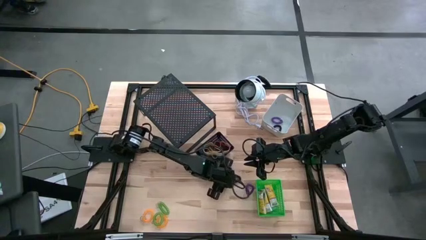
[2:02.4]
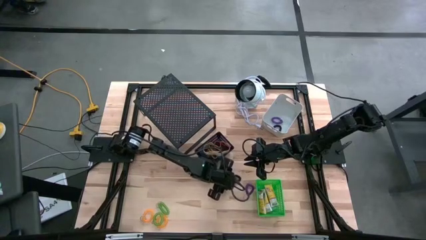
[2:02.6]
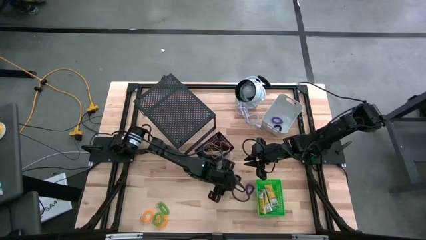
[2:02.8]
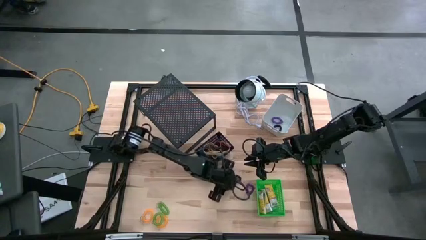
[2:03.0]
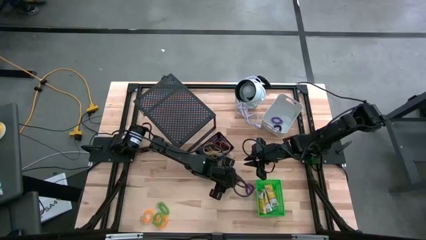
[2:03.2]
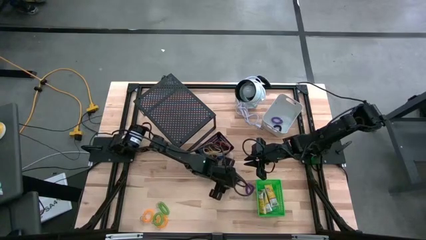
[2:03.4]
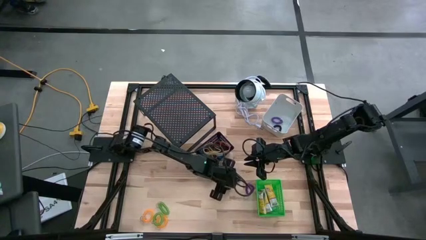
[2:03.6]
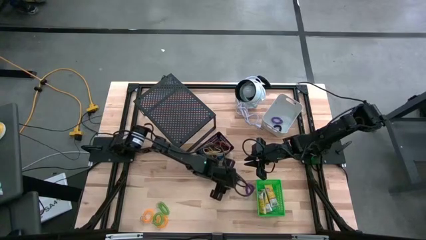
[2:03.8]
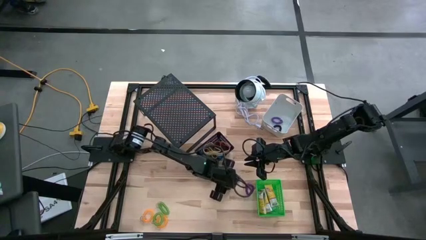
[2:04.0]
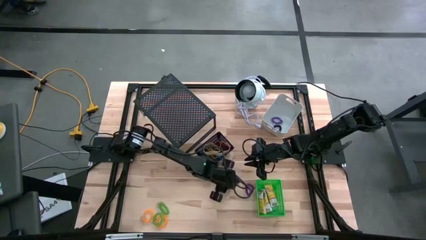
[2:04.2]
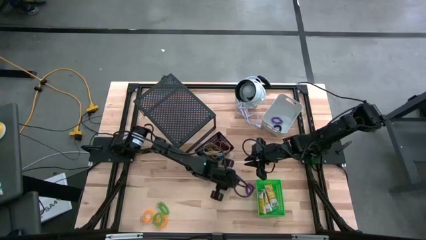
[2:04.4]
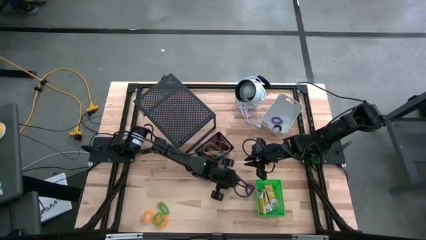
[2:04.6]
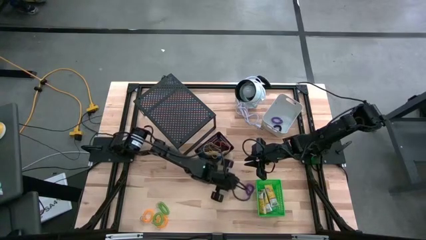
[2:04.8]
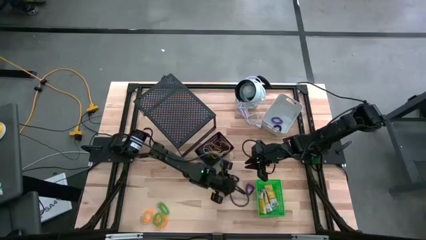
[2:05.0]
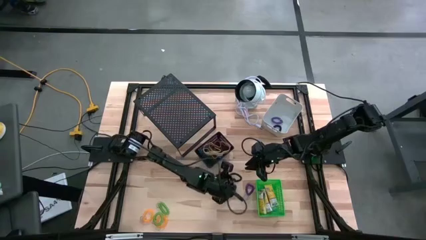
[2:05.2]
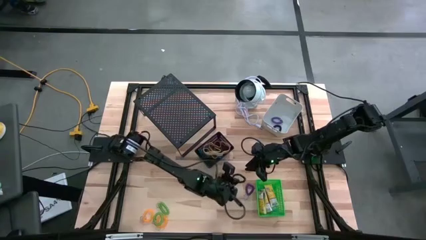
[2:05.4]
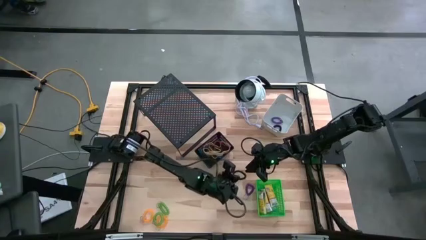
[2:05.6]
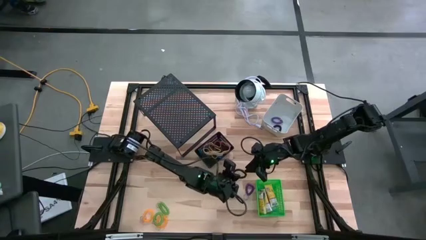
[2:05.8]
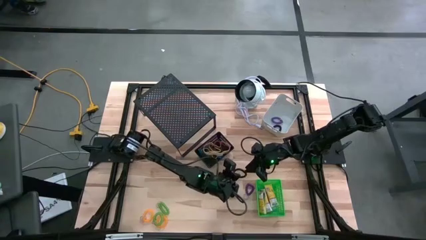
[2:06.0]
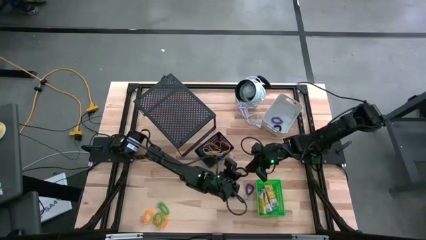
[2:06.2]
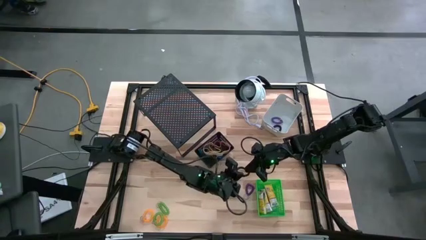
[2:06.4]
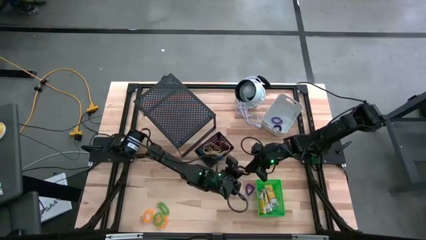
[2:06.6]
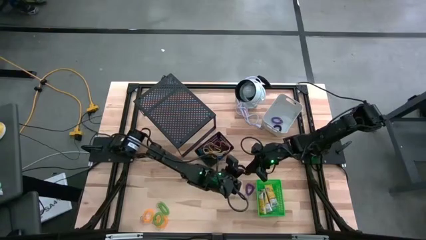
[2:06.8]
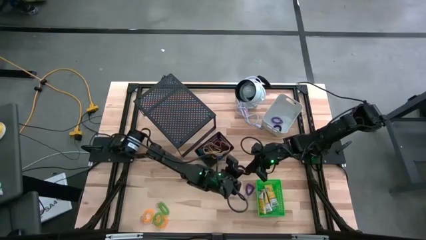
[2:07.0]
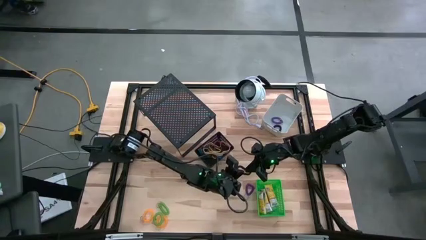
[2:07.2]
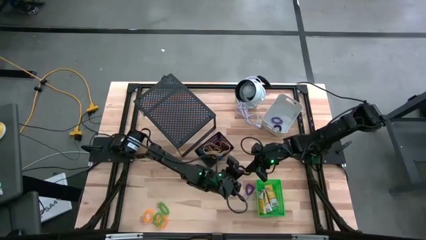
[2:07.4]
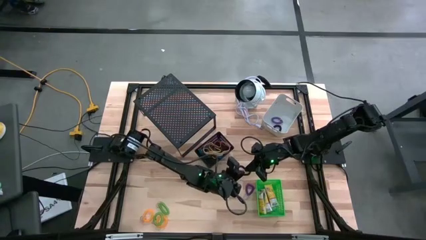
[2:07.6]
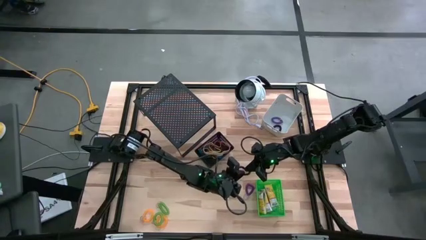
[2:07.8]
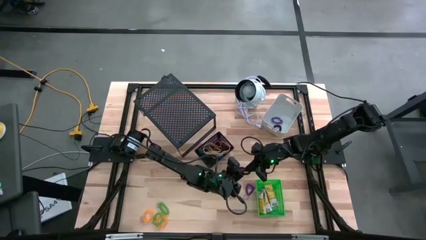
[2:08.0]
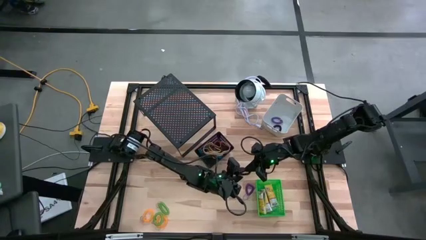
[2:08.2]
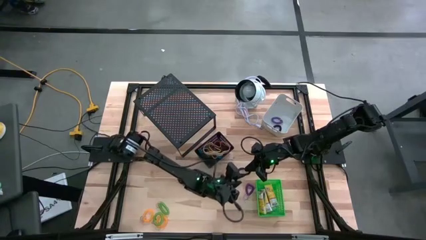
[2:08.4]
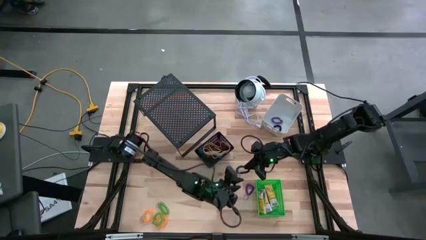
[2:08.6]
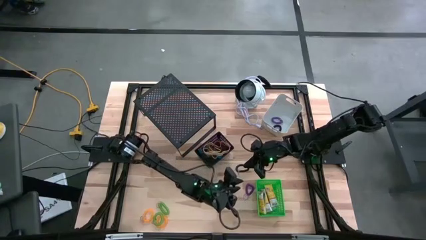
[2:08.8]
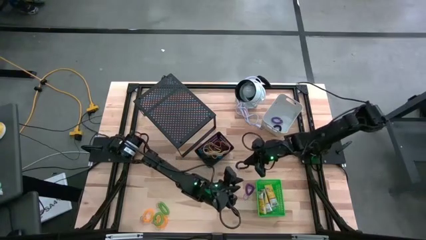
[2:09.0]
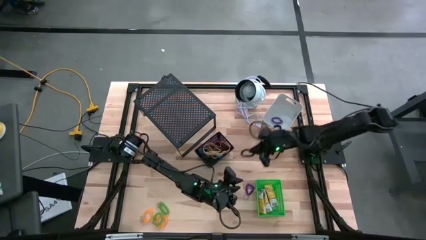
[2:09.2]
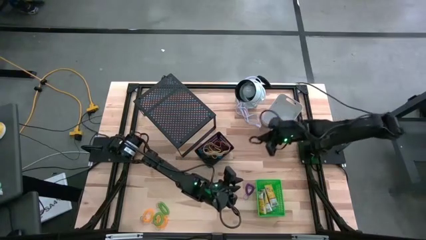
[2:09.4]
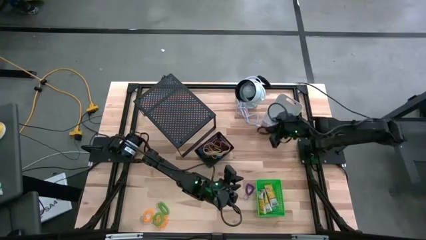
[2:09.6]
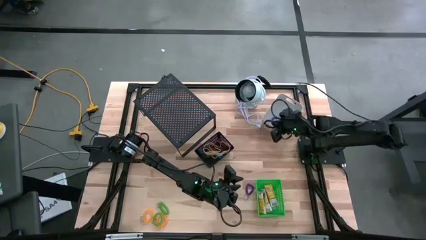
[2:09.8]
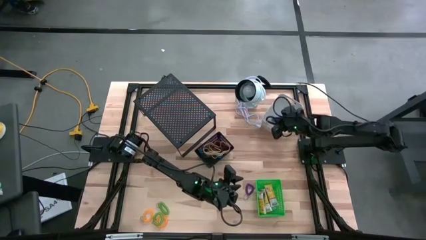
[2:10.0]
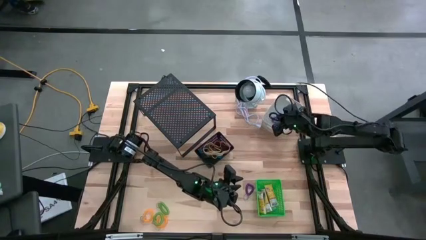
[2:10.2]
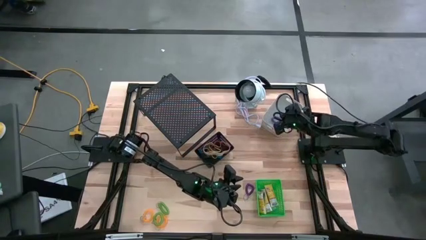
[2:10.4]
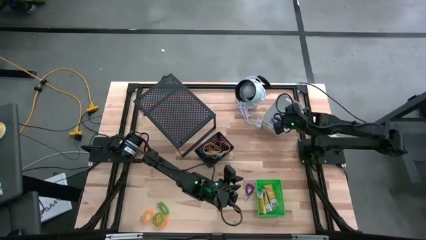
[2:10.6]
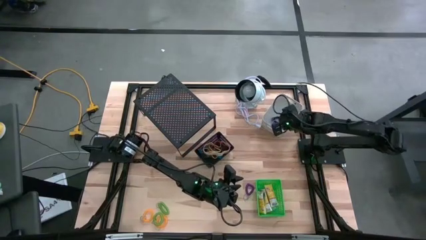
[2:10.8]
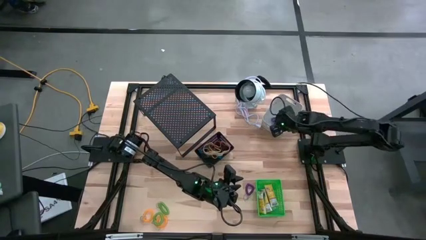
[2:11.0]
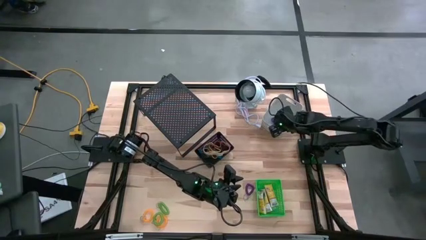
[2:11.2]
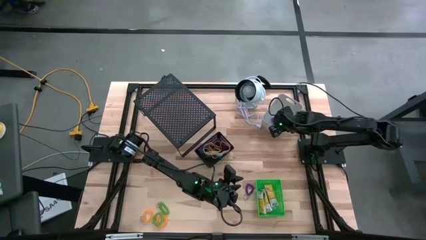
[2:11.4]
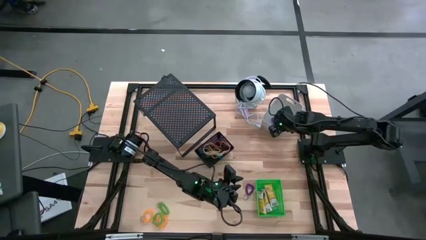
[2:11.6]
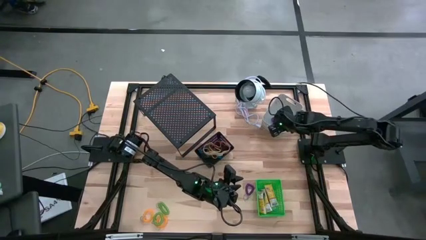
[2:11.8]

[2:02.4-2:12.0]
Task: Pick & Place Office Desk Supplies
Put the black spring keychain into the white bin

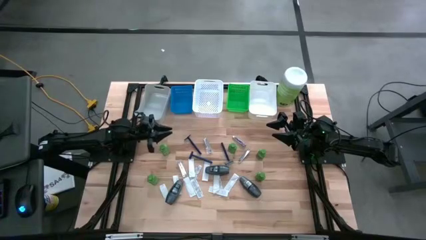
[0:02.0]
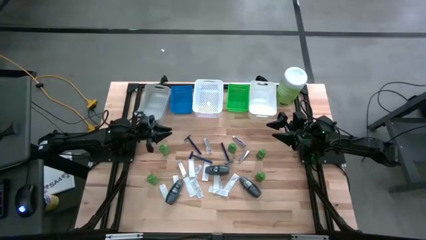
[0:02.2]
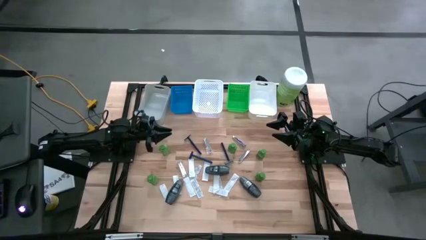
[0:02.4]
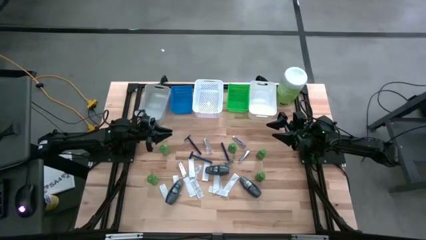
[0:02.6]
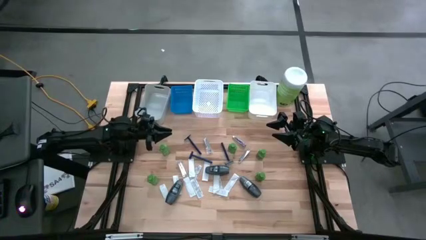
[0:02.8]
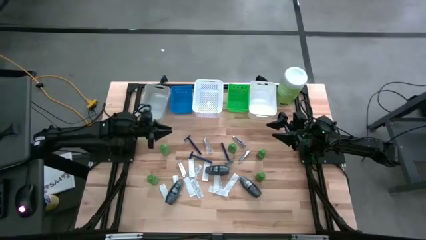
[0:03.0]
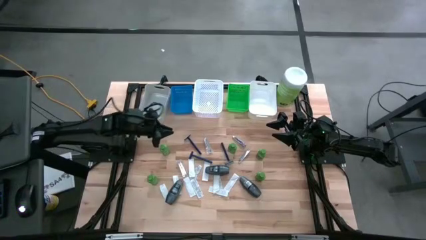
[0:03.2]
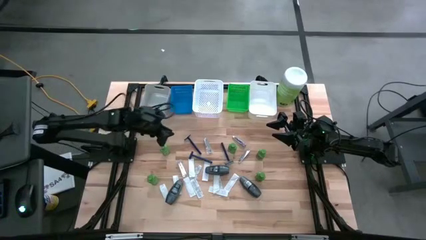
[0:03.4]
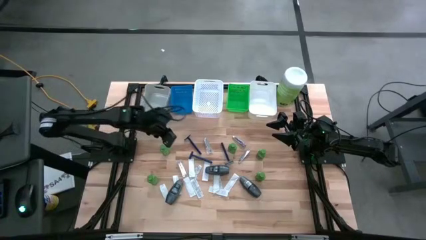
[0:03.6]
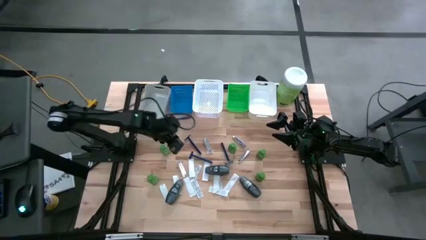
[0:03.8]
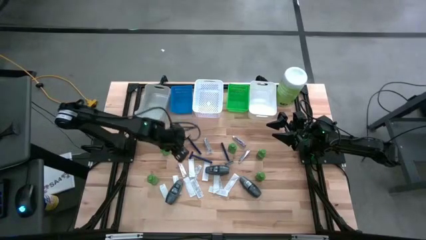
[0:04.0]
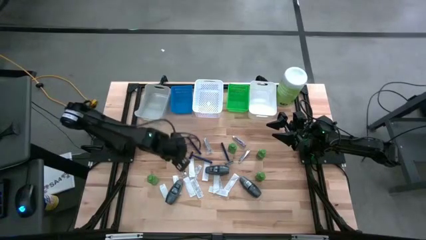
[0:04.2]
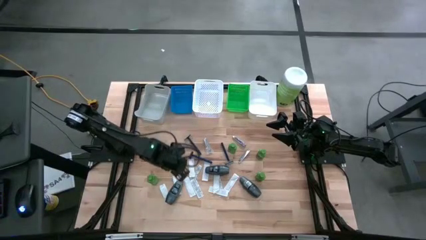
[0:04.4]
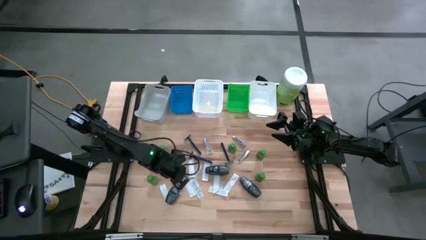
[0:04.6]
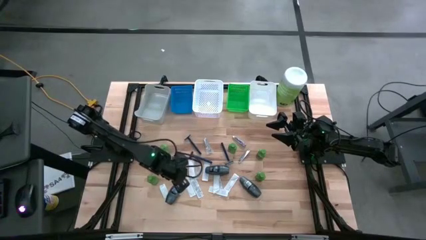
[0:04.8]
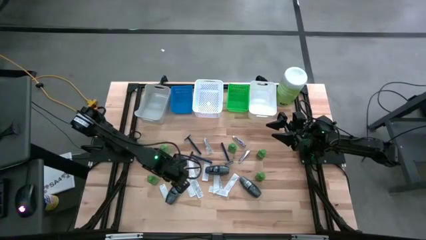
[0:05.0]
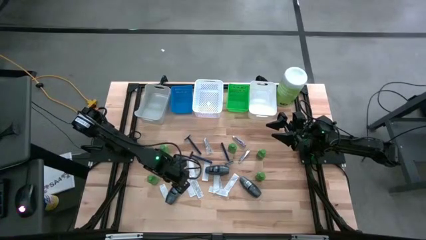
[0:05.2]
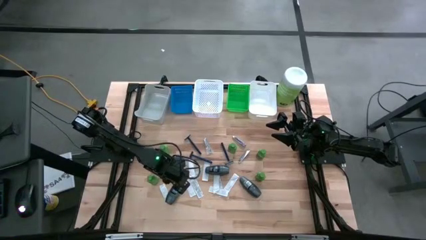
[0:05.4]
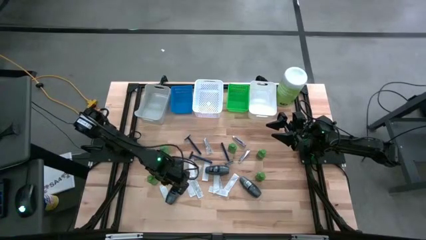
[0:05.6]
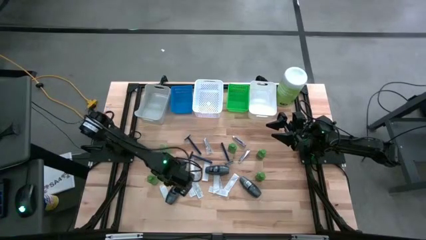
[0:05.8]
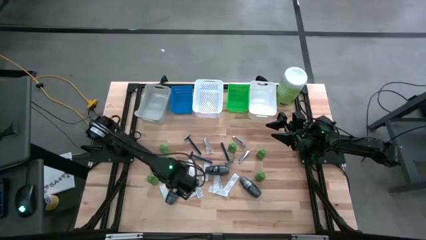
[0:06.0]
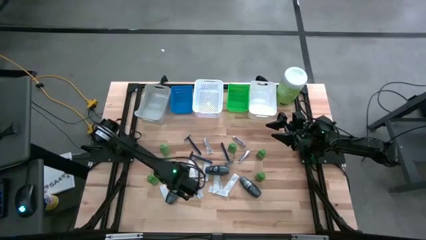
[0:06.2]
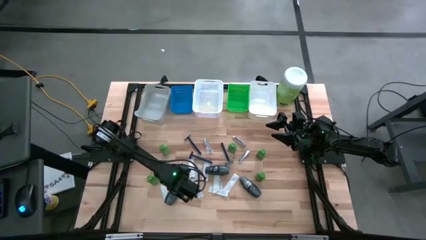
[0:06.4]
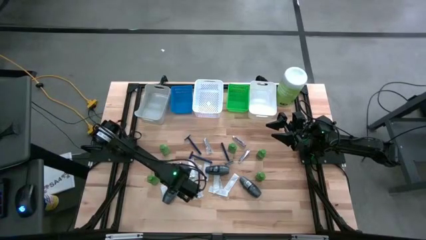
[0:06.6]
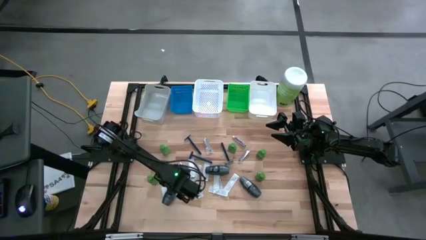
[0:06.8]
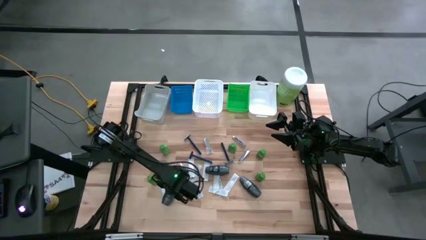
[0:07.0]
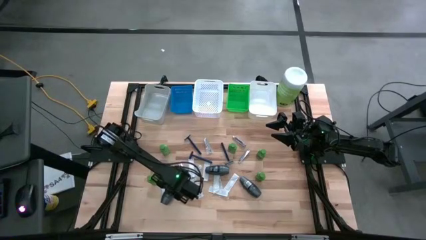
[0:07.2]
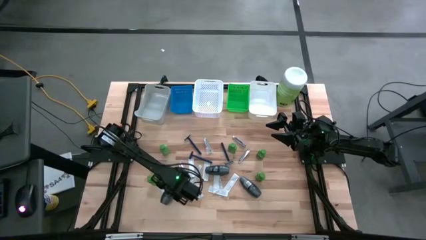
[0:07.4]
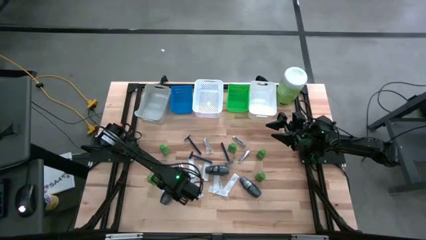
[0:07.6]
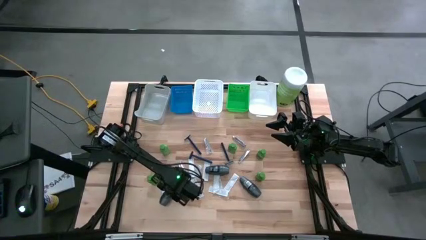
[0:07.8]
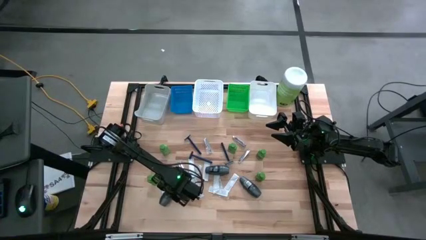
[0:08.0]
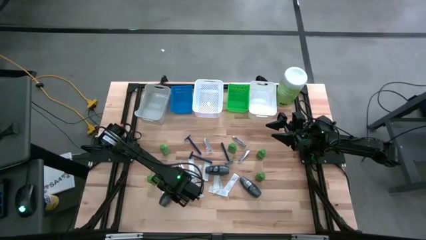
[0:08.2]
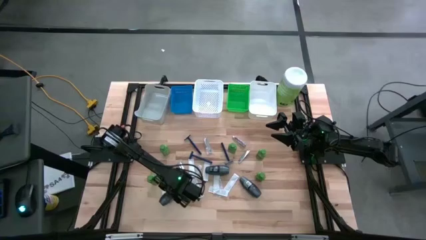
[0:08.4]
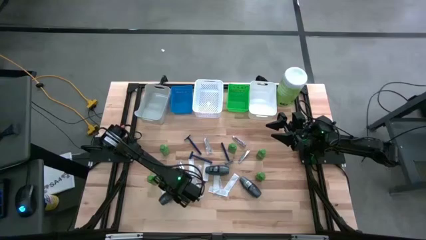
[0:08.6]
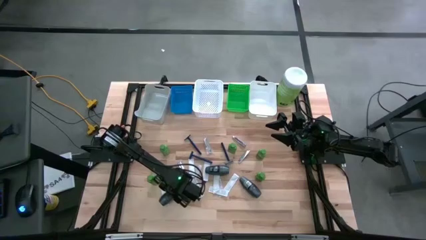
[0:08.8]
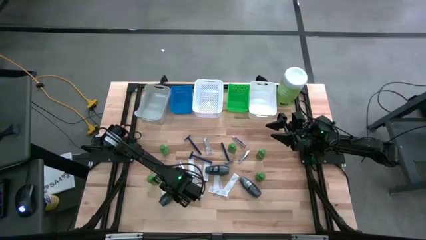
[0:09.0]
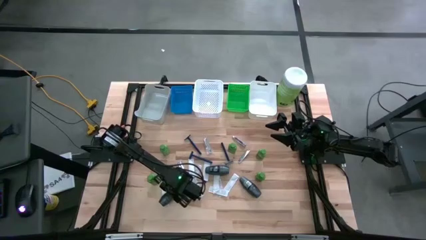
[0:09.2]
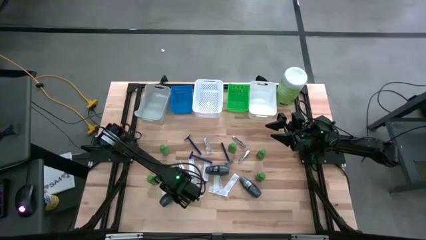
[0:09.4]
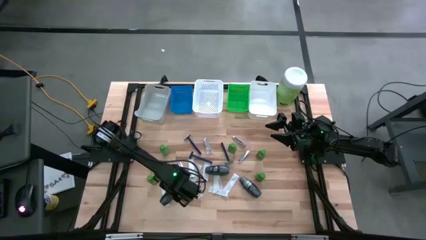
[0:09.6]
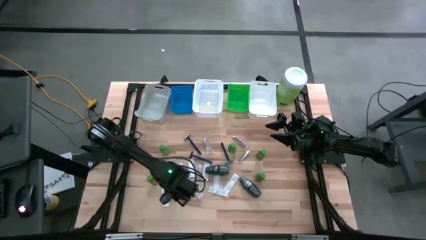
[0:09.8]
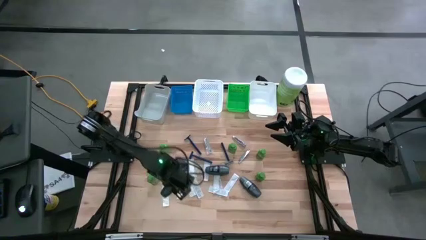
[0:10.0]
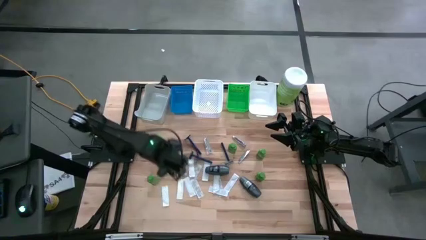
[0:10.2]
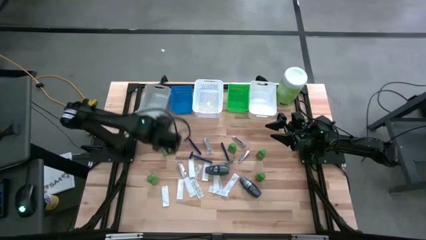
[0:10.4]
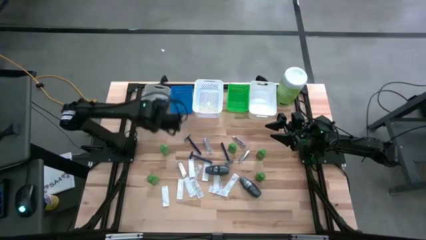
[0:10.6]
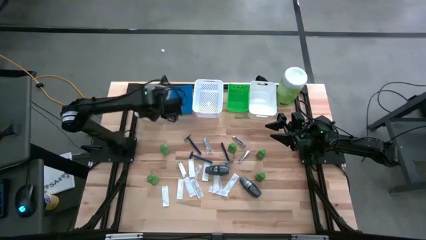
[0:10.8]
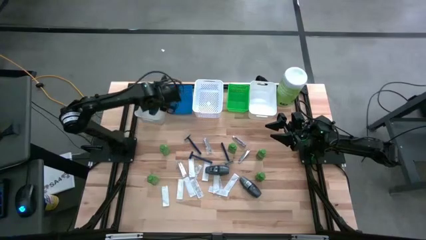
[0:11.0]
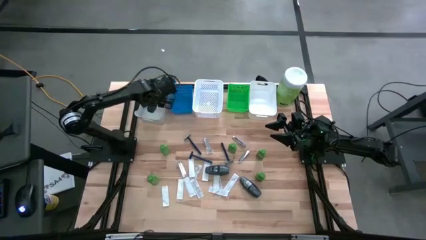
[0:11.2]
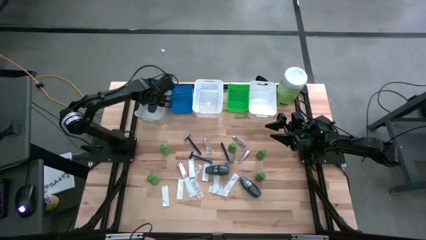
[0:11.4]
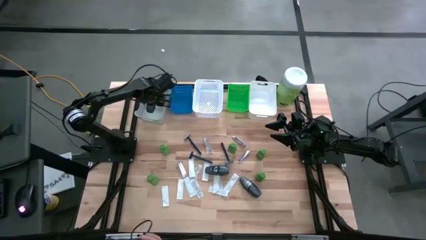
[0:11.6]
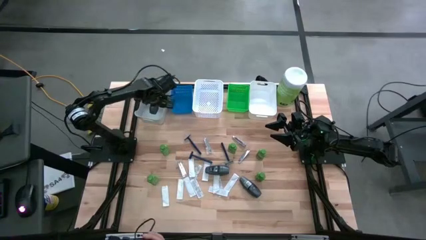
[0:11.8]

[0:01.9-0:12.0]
Task: Pick & Place Travel size toiletries
Put the left deodorant into the gray bin
